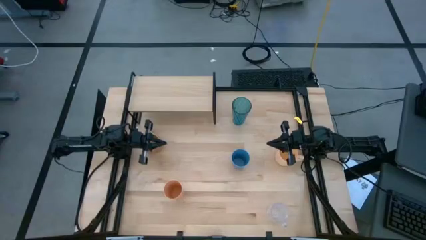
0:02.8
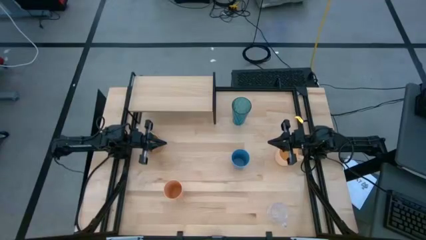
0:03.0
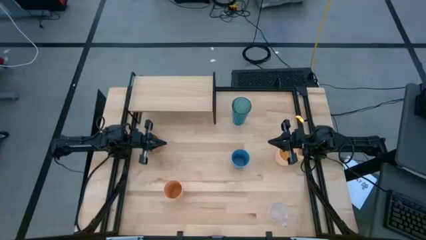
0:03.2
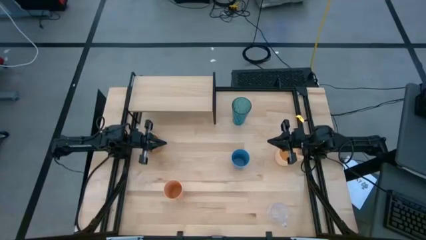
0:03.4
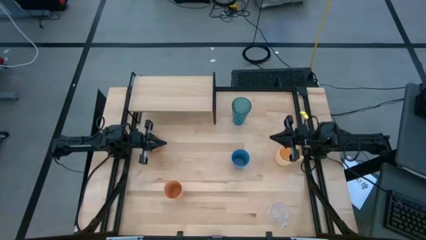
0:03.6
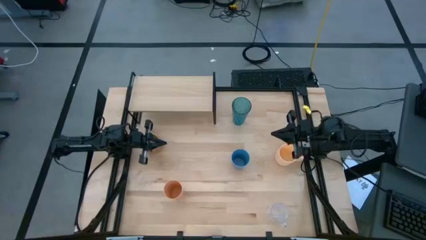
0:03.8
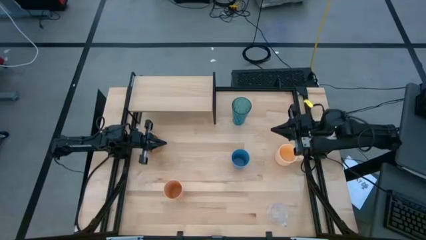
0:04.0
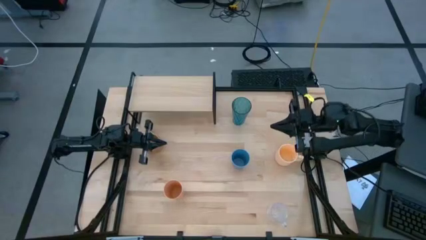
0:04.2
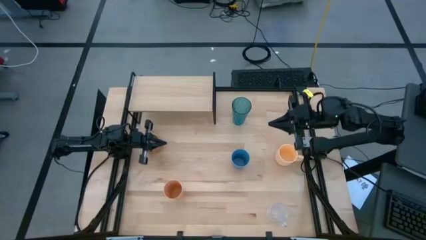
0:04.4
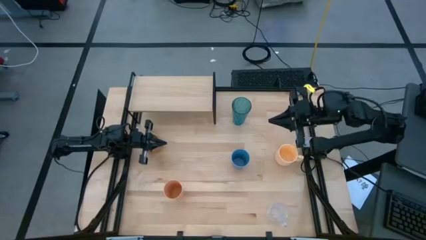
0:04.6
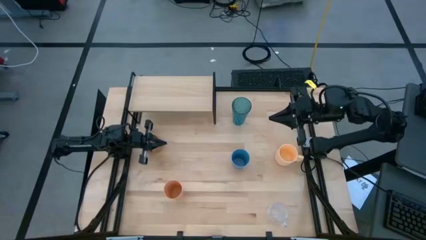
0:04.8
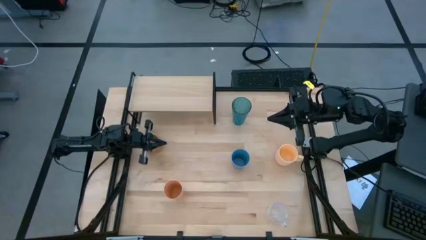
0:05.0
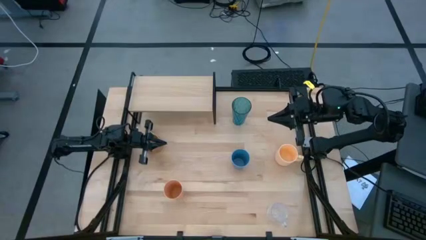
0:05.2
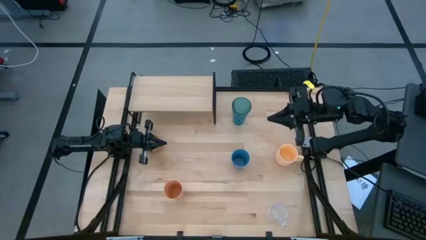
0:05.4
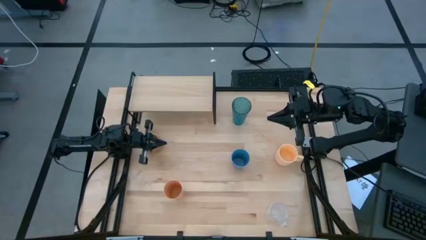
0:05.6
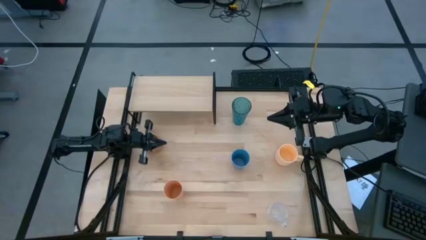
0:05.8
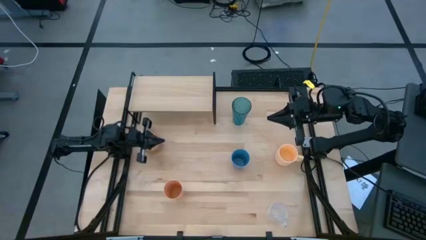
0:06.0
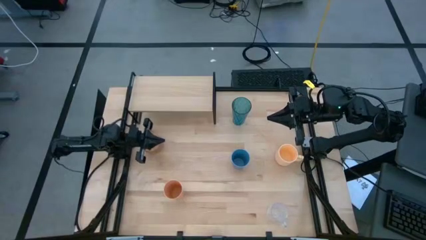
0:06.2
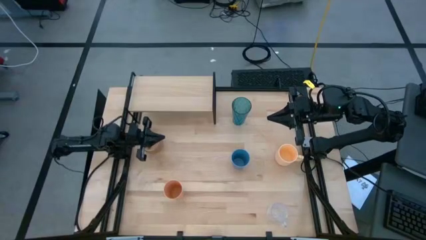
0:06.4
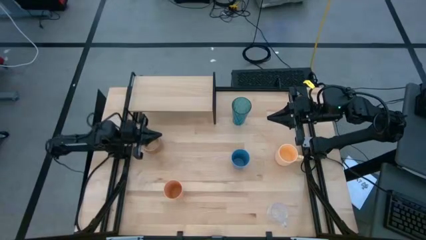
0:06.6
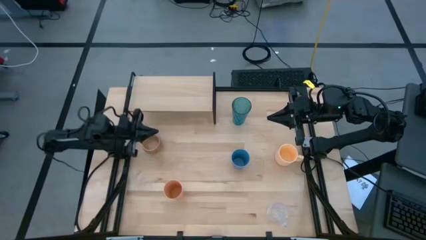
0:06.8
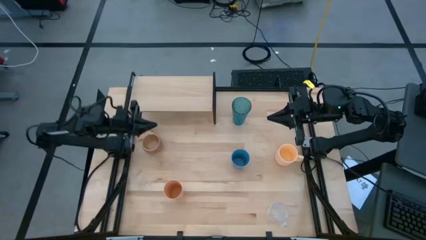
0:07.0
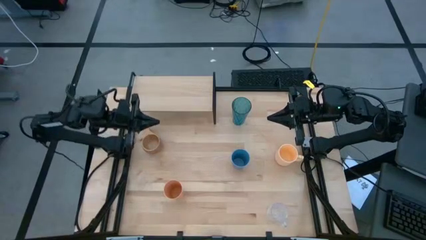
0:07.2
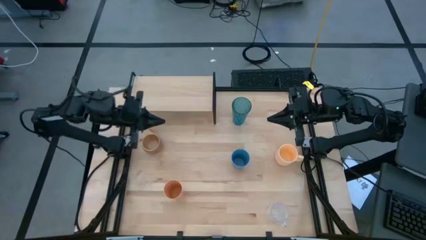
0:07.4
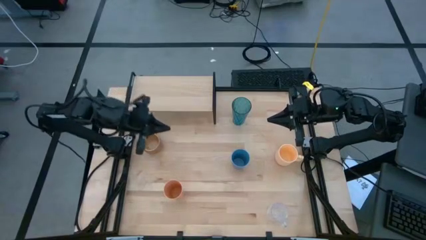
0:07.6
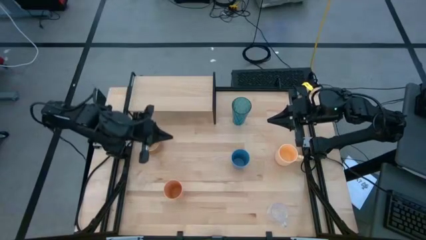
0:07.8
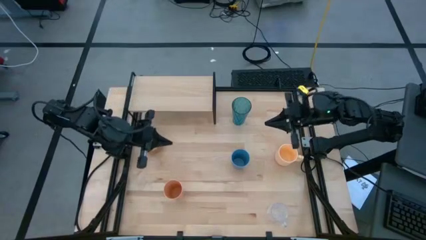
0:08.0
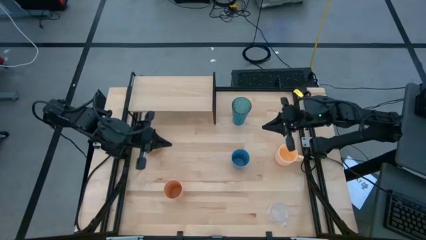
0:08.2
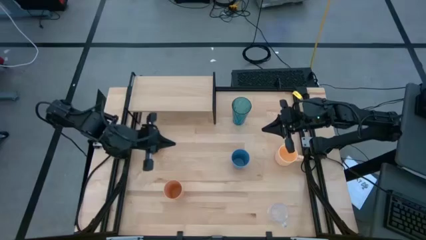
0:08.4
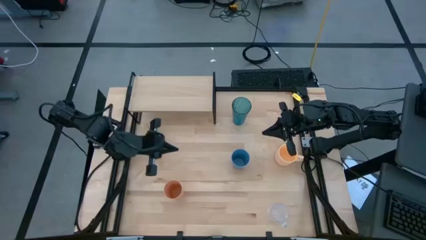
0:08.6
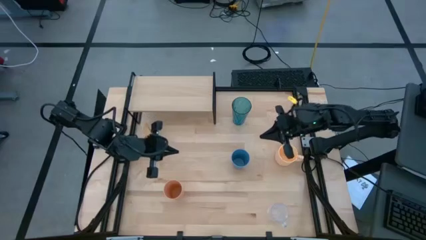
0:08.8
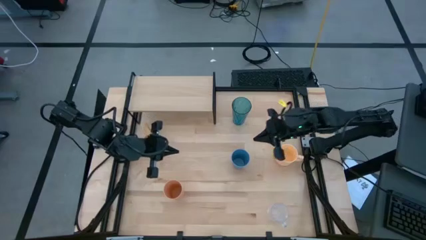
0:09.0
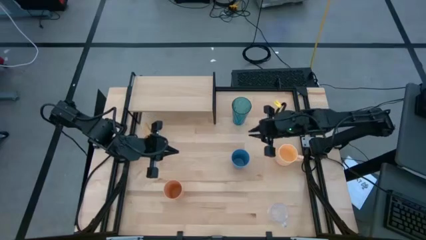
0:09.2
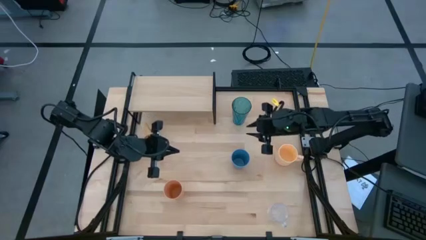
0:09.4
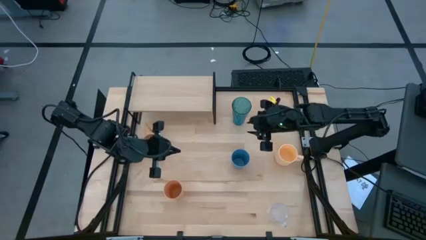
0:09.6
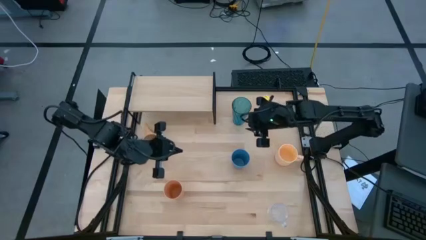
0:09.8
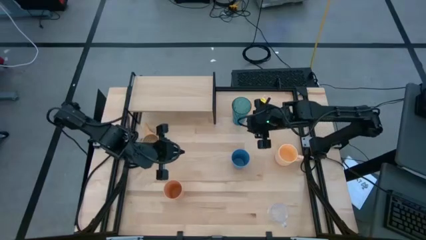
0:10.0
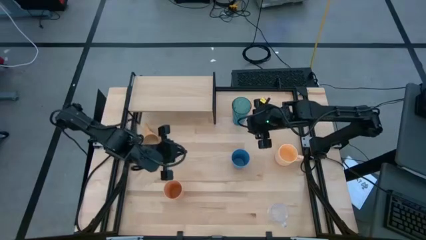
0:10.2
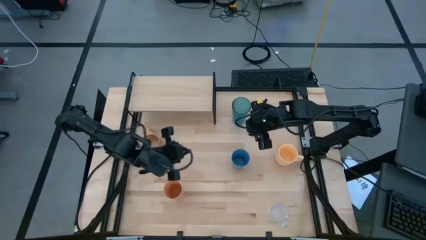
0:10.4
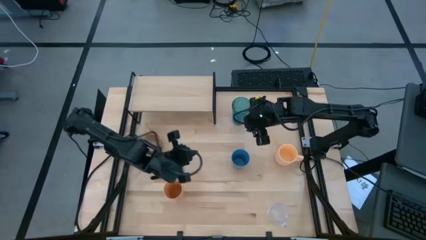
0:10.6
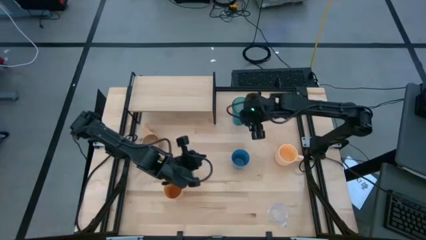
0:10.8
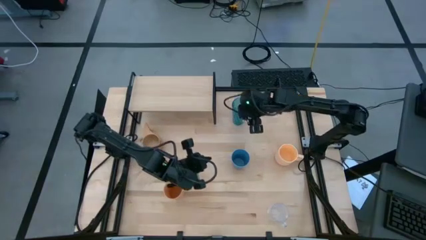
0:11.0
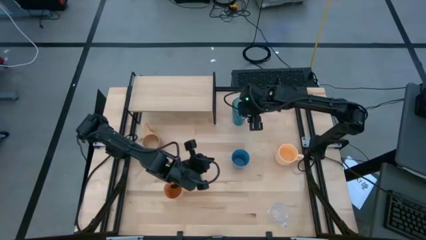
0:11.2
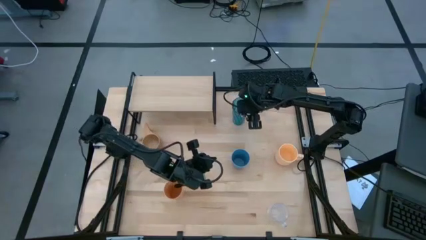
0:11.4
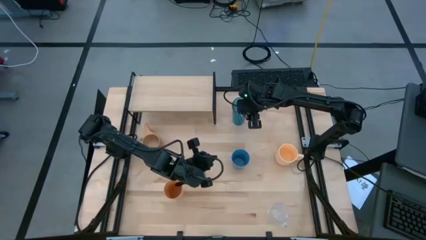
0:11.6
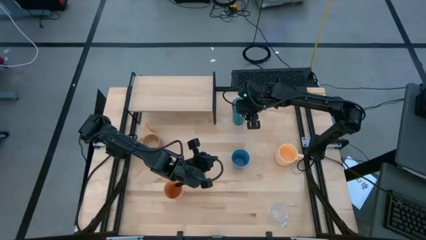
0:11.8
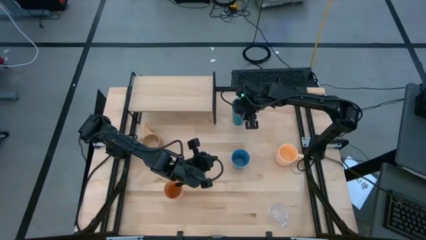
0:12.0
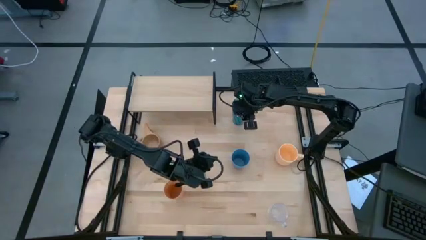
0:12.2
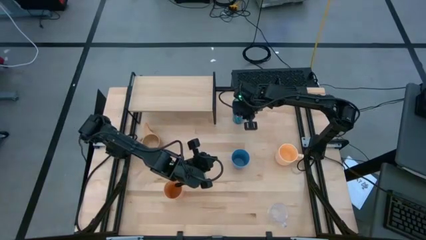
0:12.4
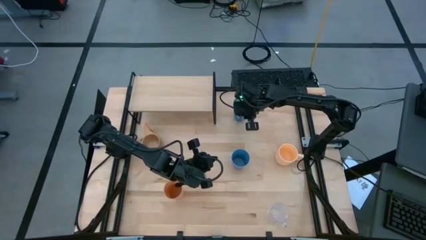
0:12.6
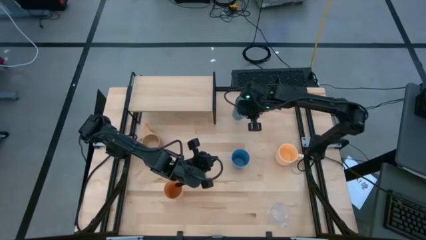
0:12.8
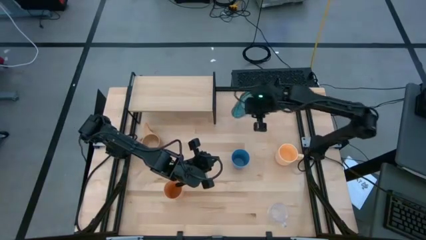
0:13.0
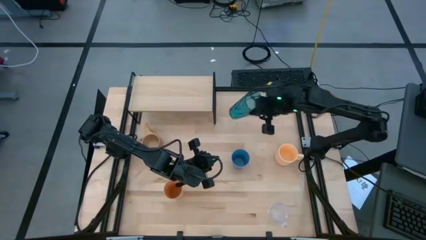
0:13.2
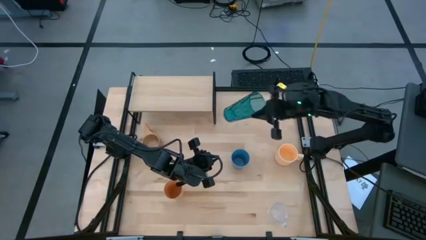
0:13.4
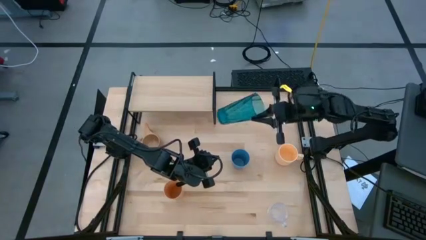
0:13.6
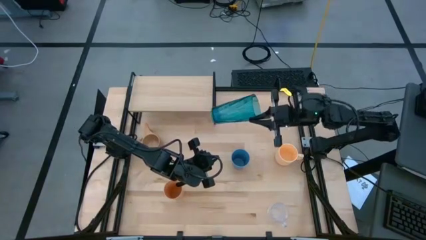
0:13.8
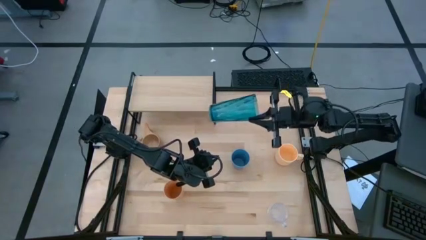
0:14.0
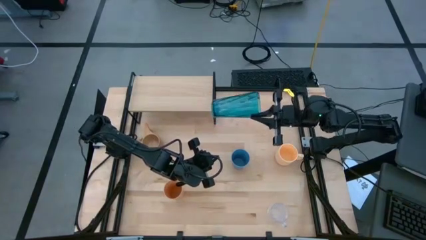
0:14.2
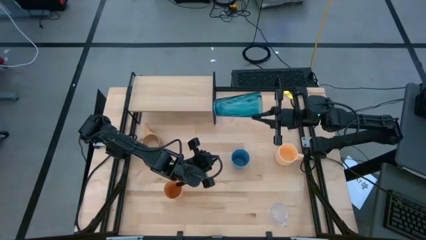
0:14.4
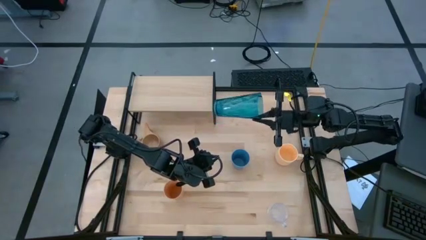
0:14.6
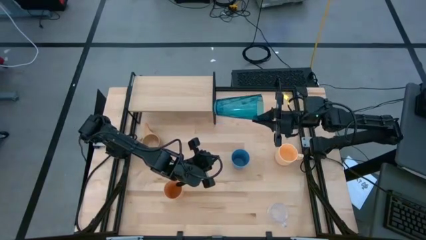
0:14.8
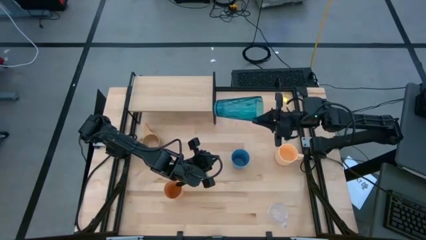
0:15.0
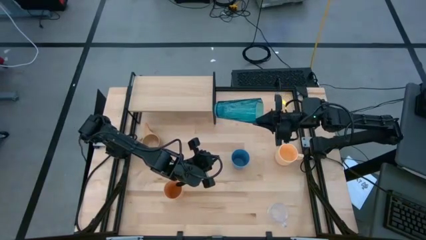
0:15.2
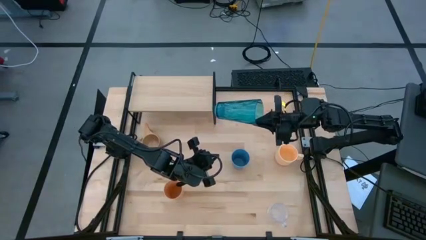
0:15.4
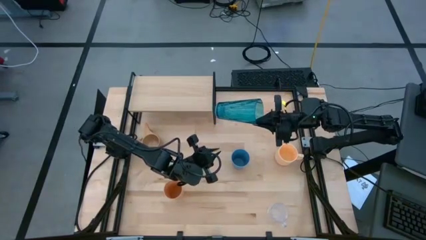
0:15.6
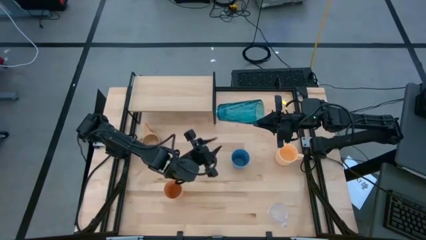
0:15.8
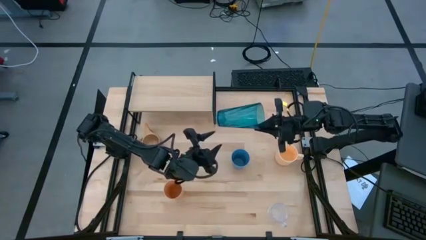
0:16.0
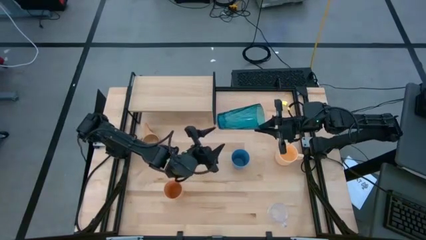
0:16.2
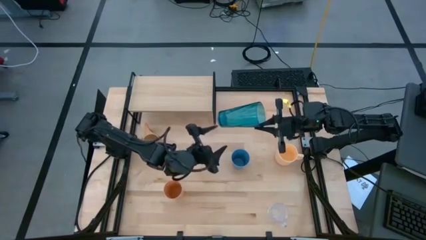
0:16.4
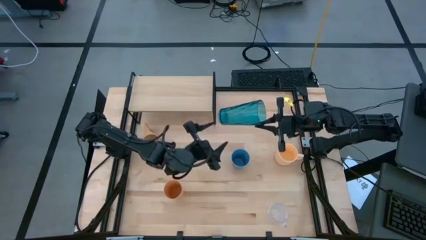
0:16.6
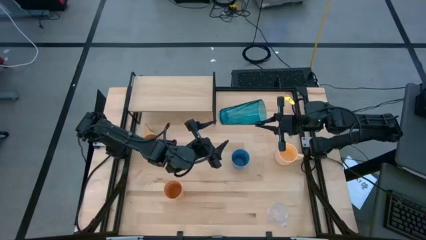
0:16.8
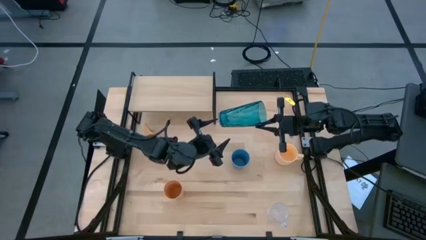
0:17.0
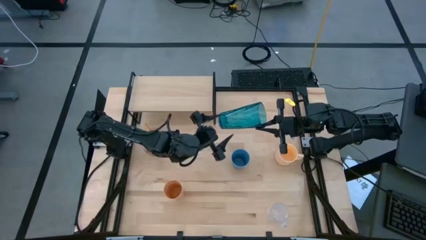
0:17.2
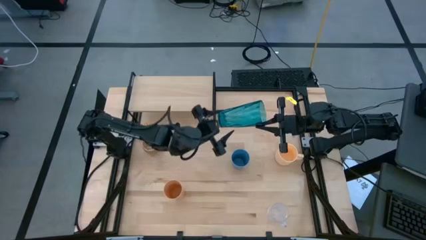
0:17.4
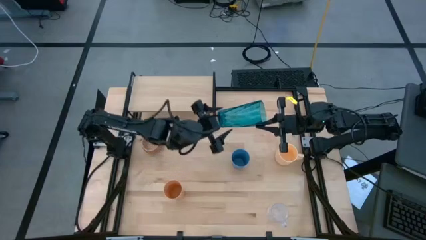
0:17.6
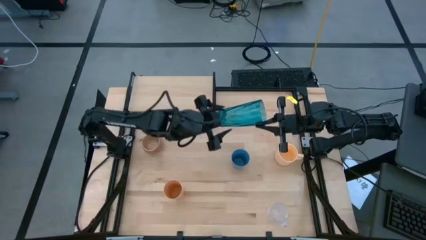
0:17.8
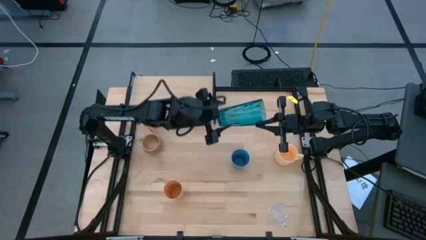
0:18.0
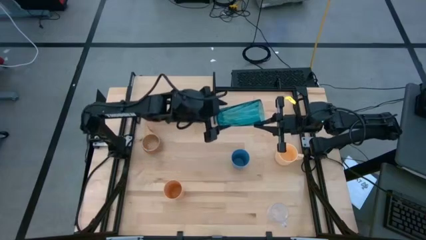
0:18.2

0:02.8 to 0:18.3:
Task: Stack small to large cups/mugs on shelf
Put the light blue cup on the shelf
